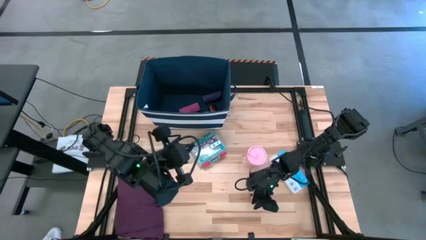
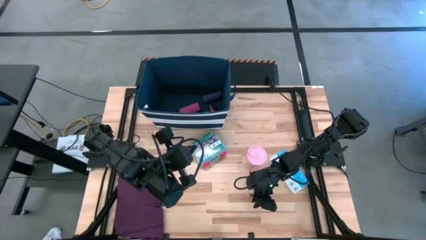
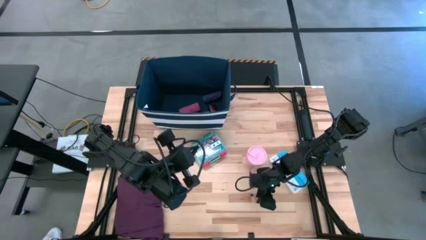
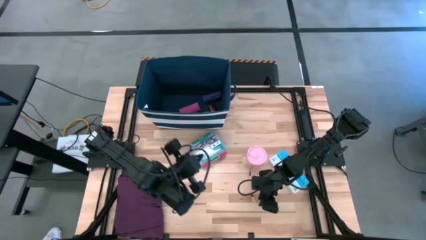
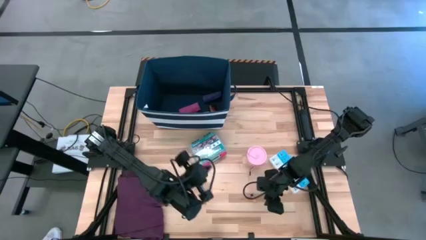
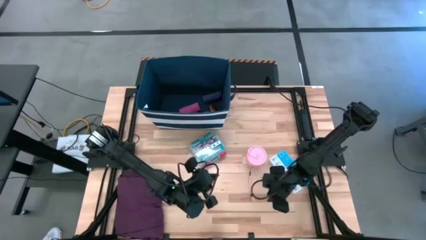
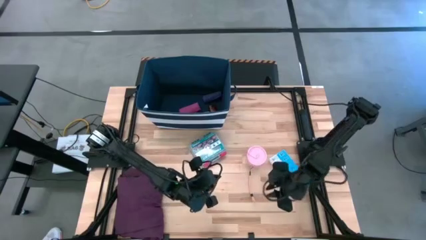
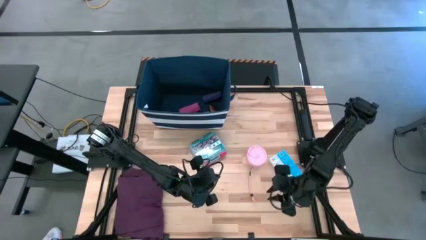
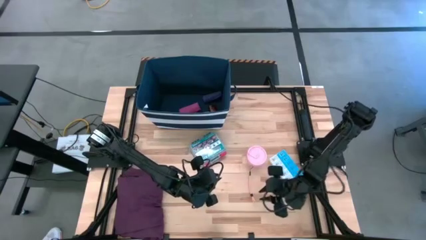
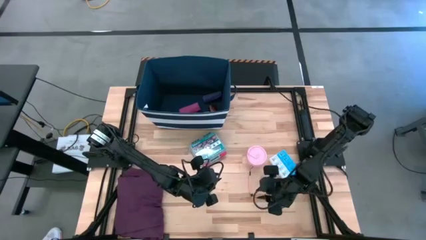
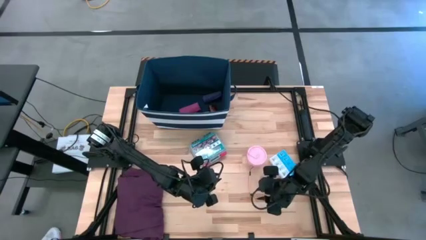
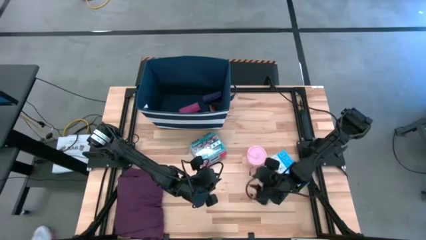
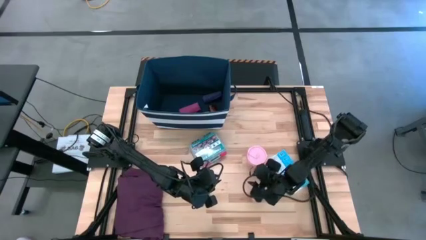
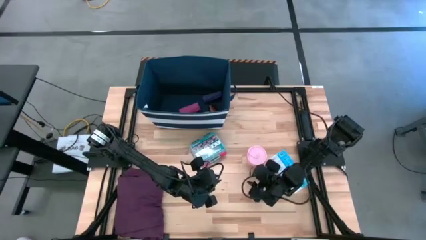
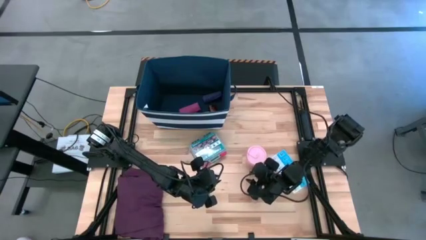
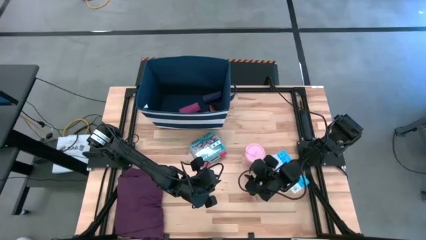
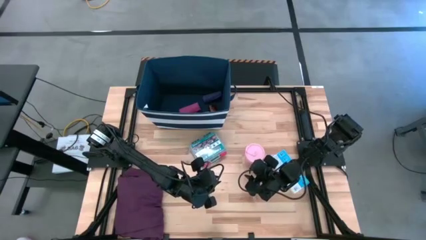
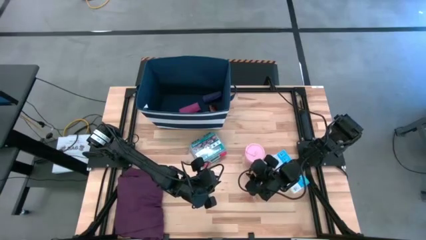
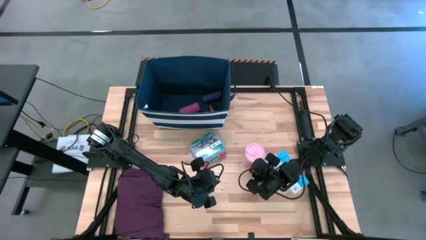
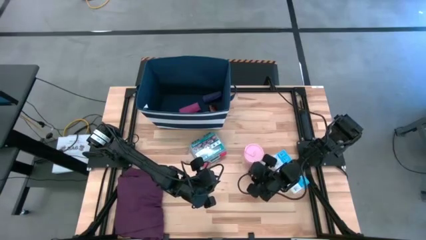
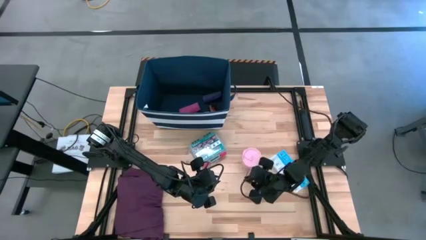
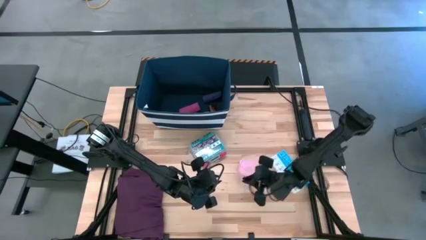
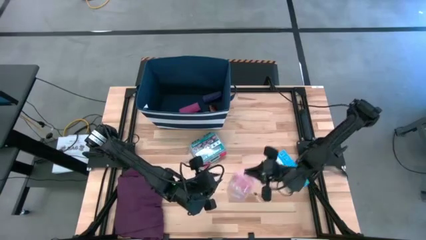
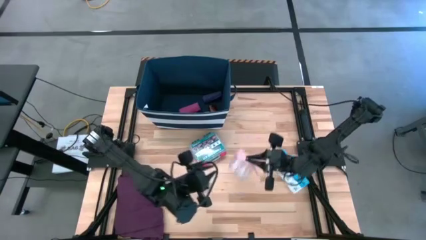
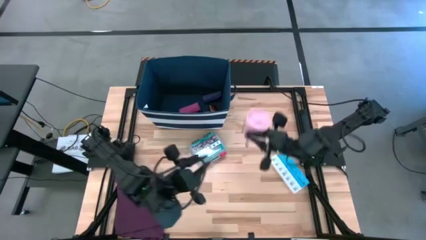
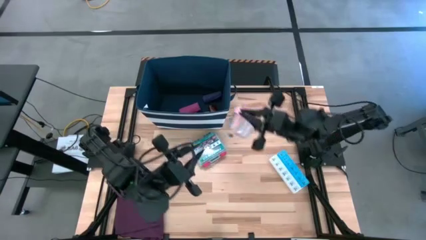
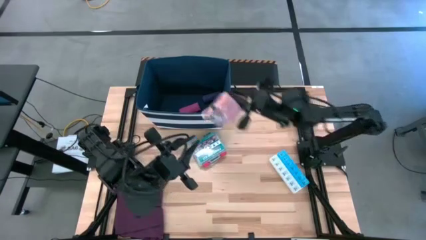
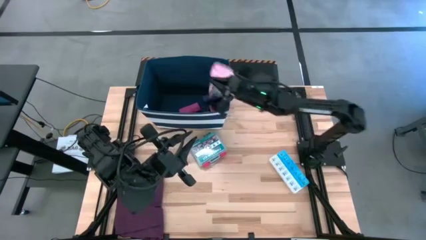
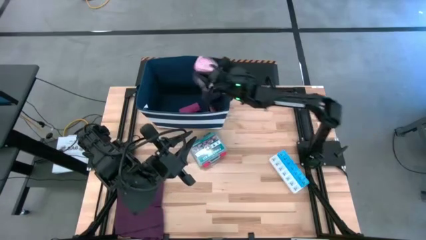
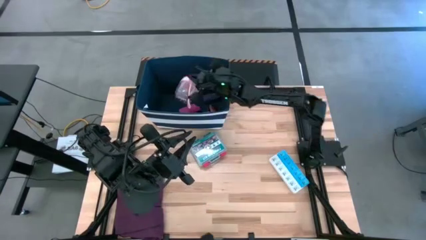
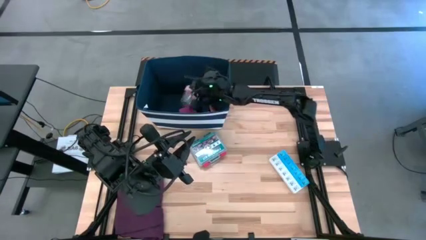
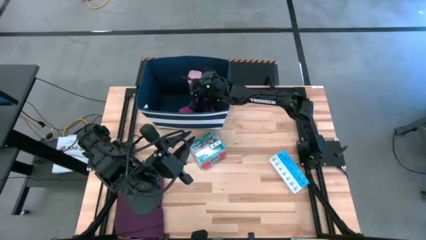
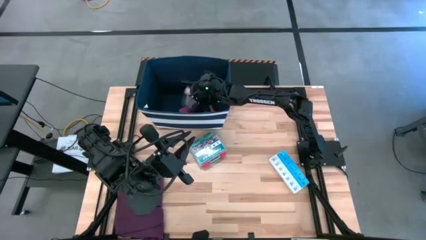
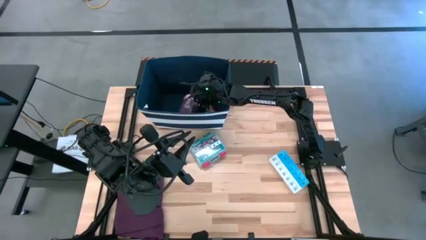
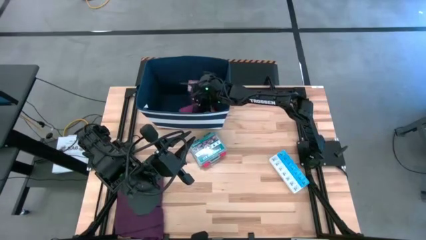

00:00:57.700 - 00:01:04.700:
Task: Pick & place medical supplies in basket/bin
Put the pink container into the blue bin

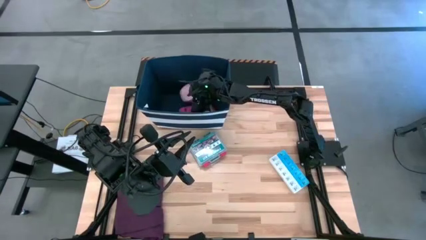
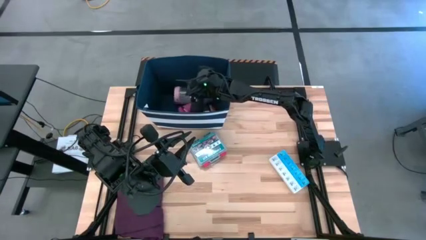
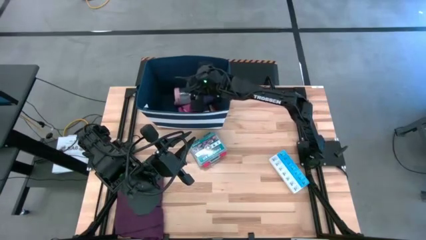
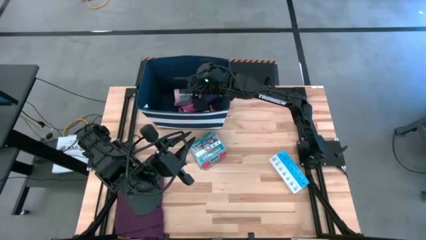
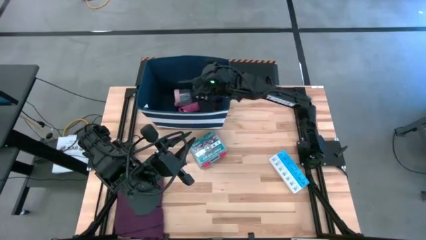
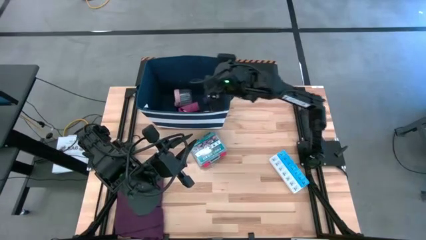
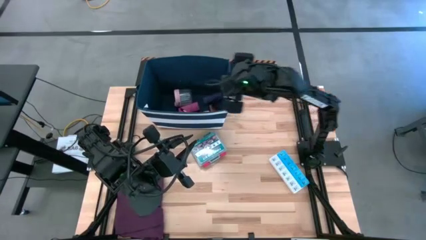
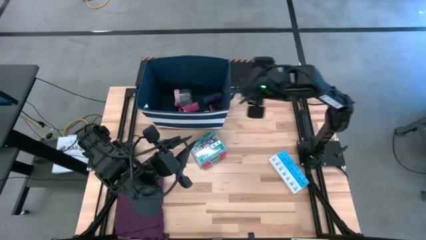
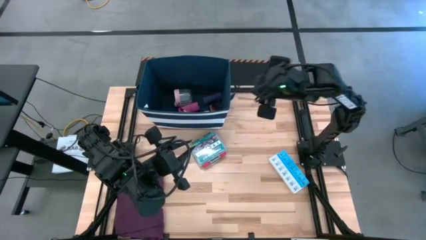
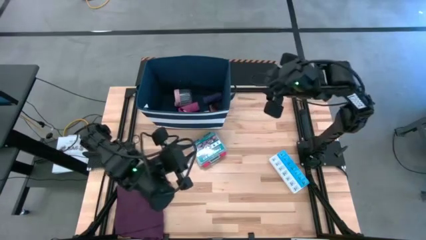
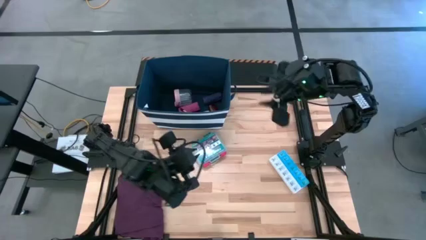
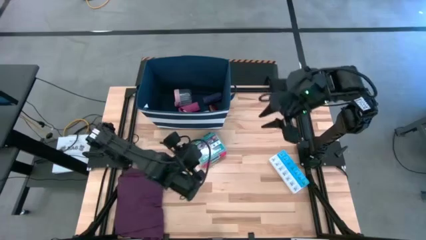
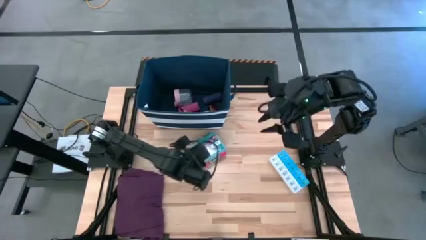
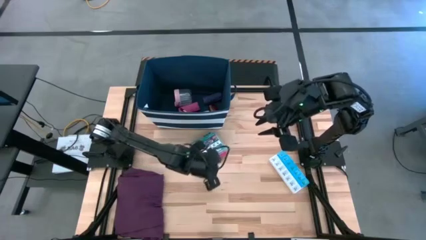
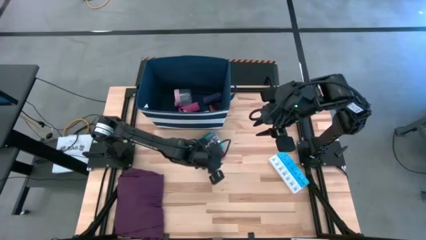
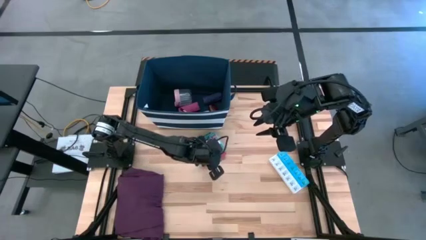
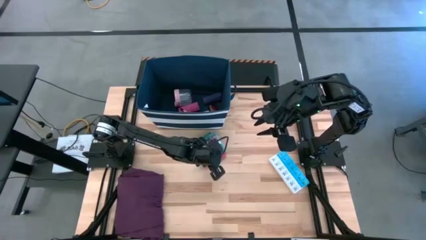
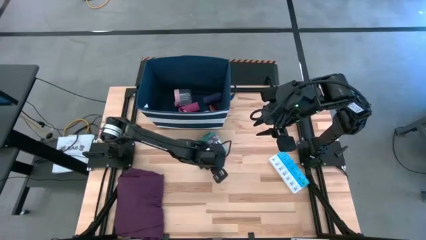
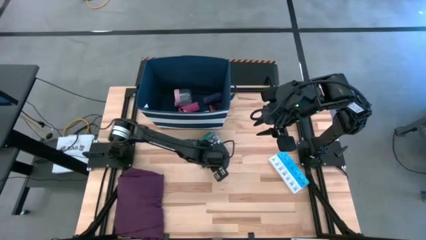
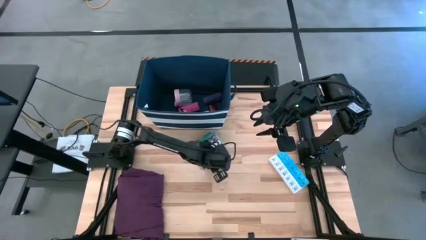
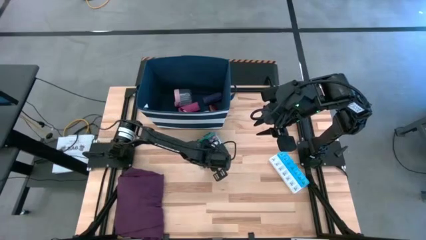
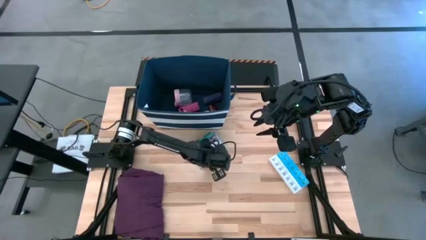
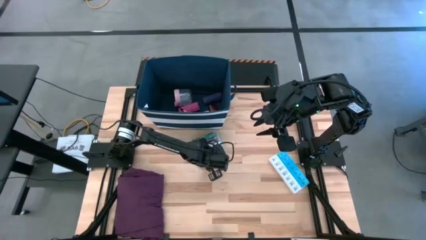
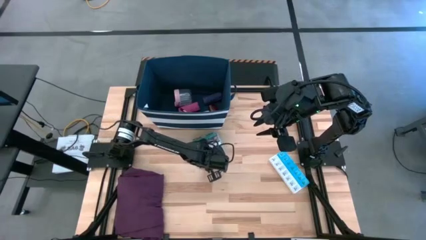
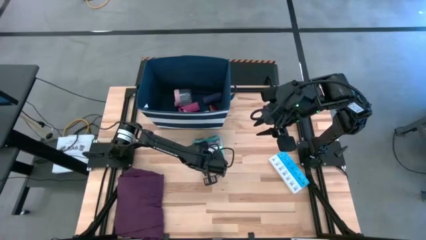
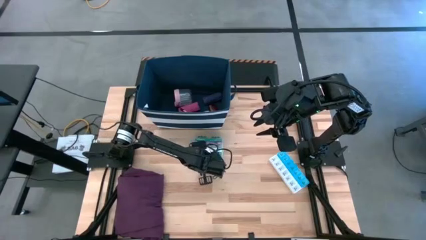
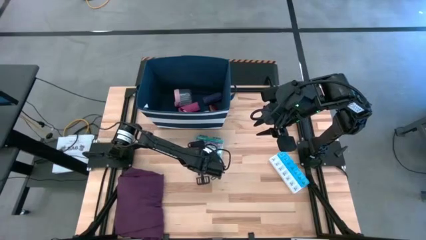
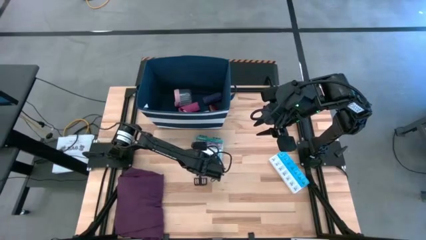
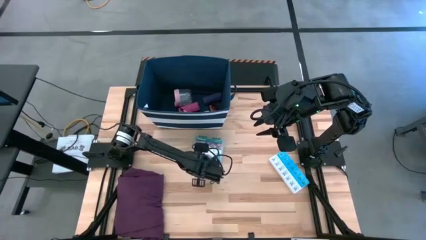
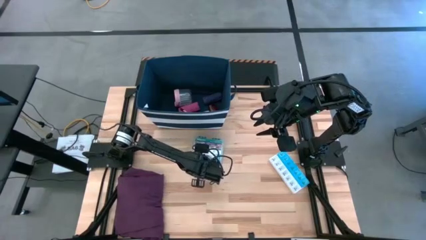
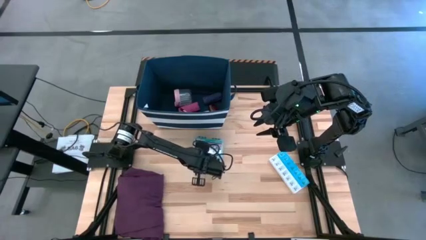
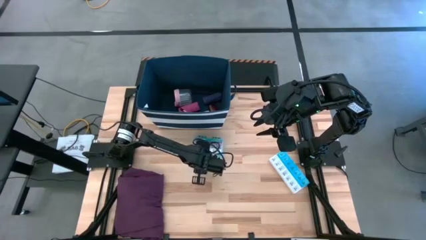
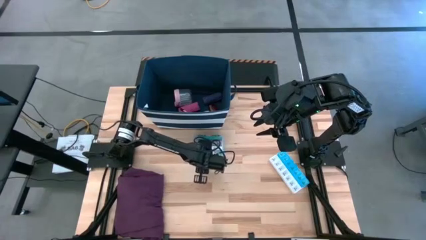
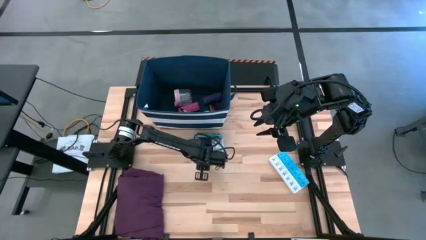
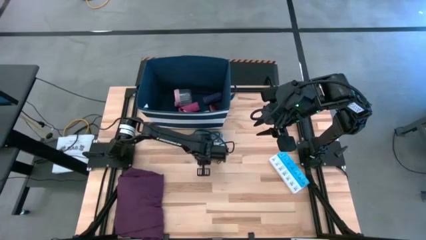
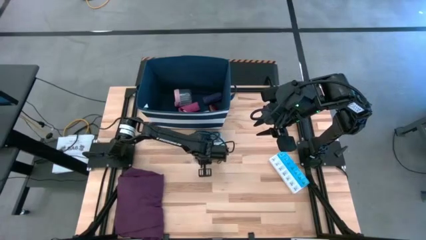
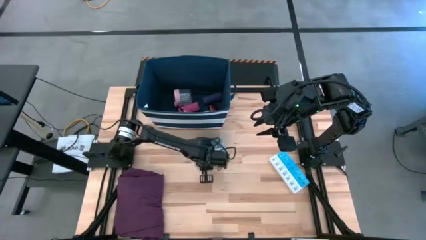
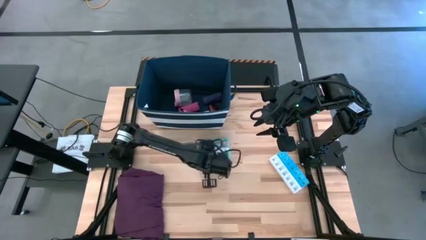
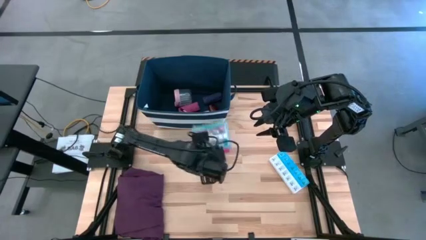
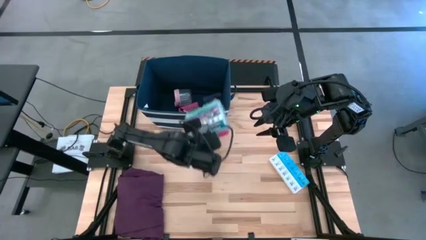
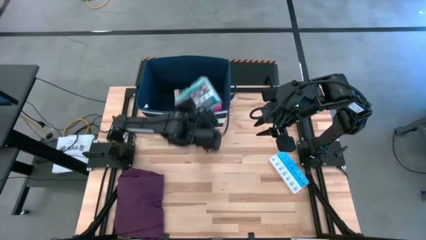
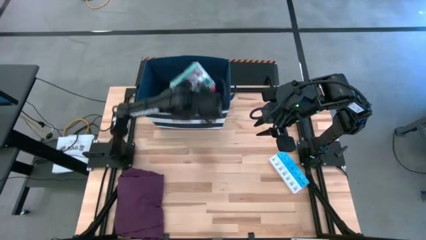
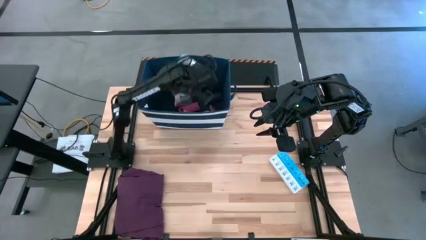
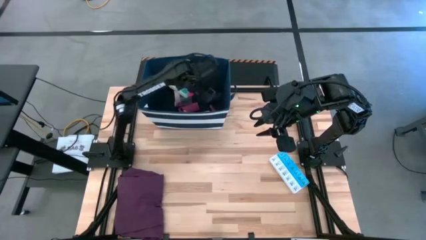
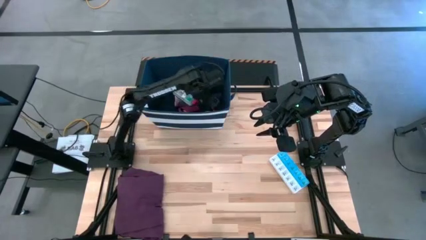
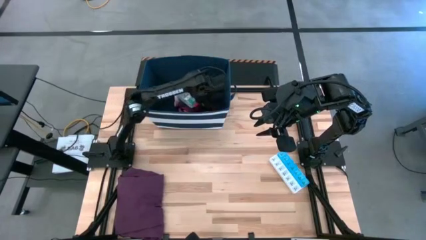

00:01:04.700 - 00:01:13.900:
Put the green first aid kit into the blue bin
